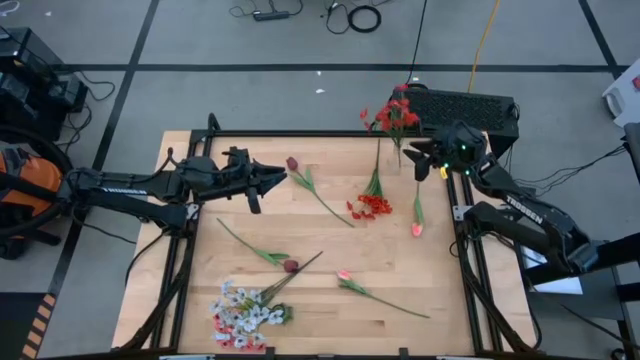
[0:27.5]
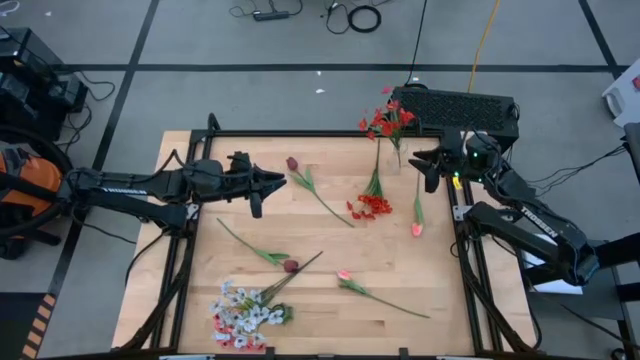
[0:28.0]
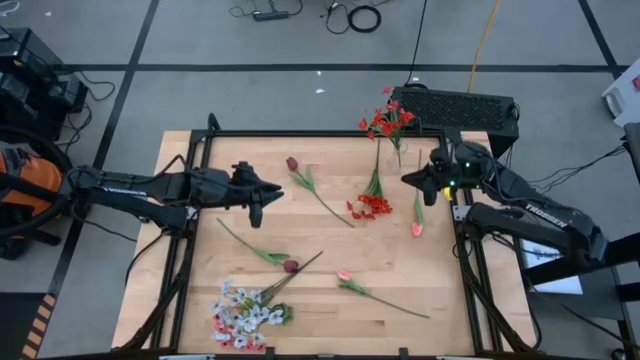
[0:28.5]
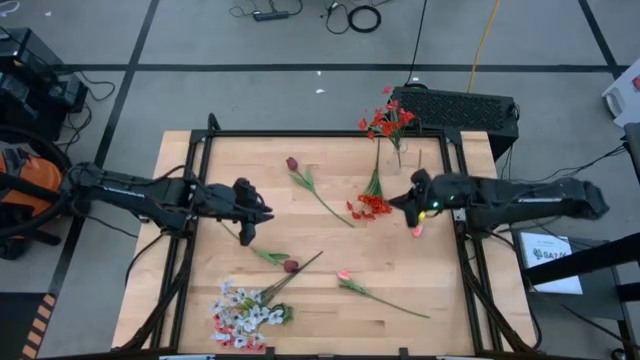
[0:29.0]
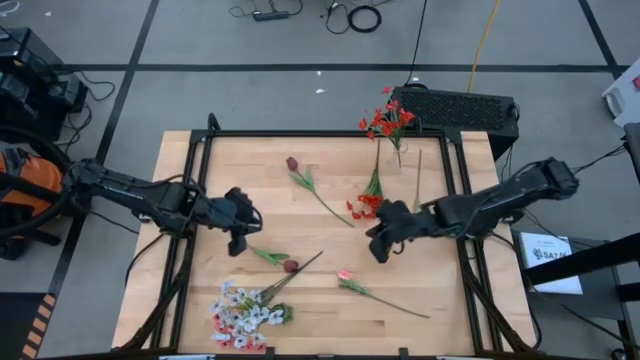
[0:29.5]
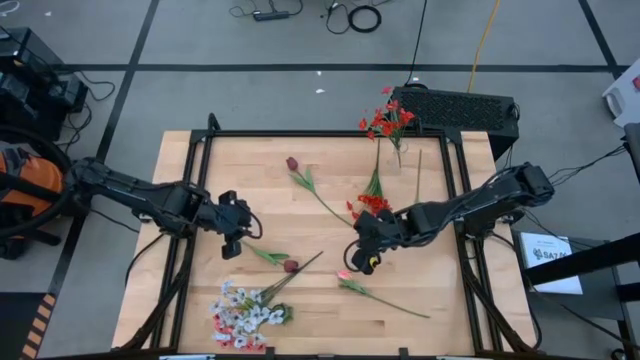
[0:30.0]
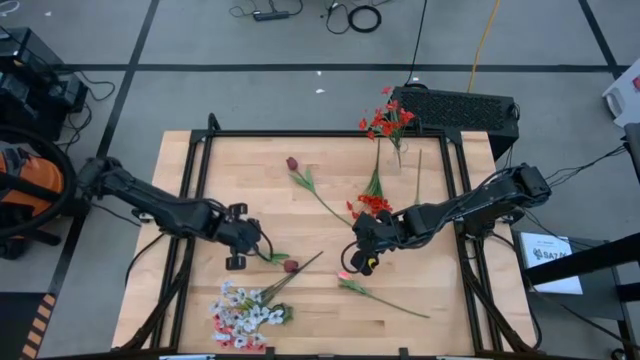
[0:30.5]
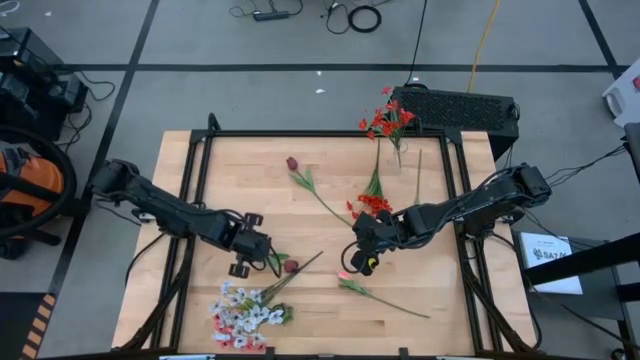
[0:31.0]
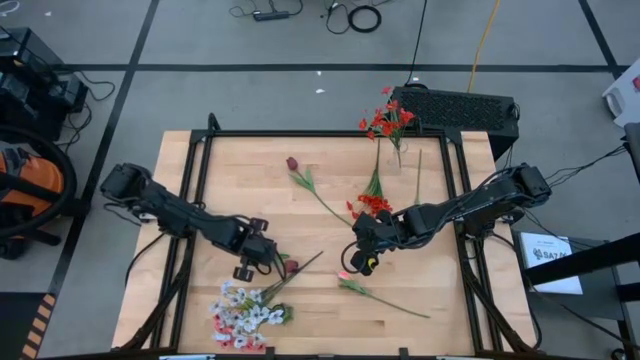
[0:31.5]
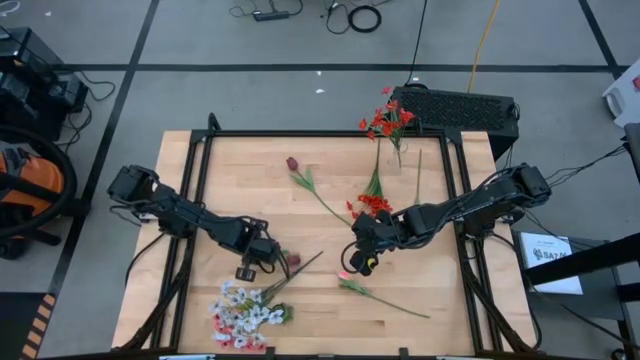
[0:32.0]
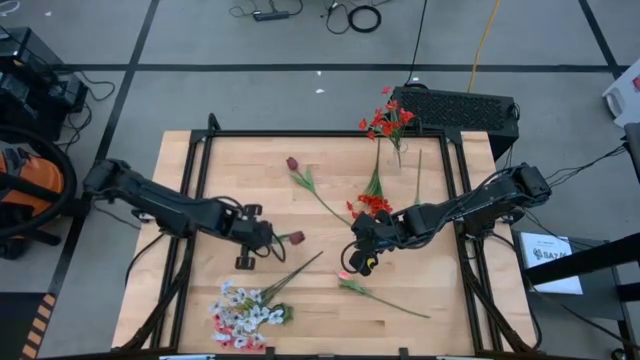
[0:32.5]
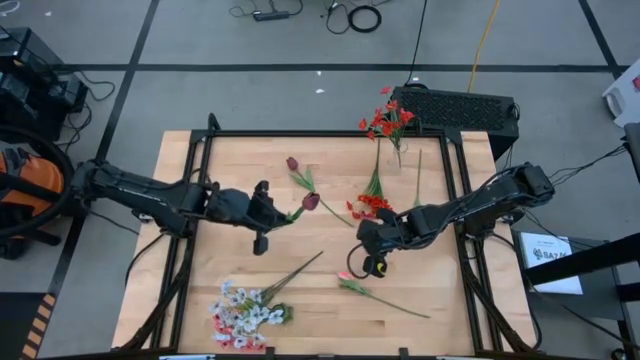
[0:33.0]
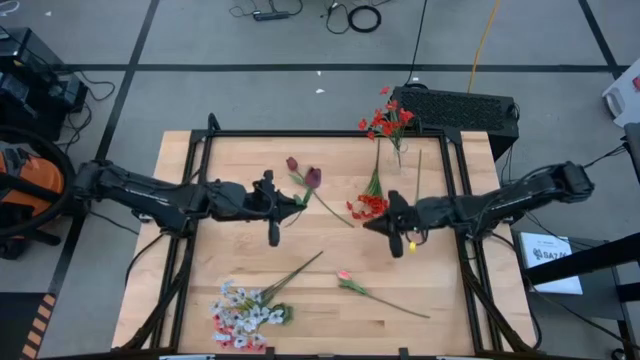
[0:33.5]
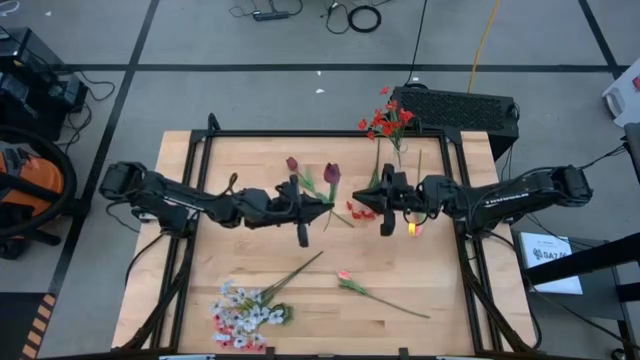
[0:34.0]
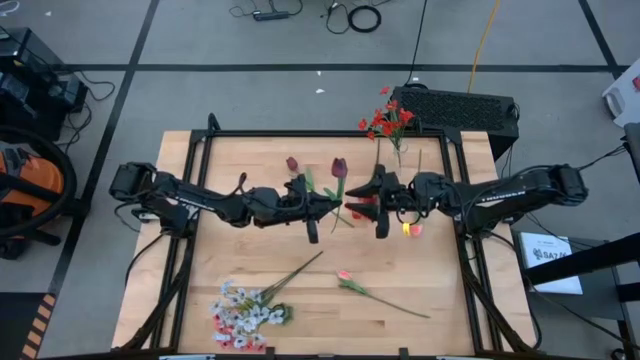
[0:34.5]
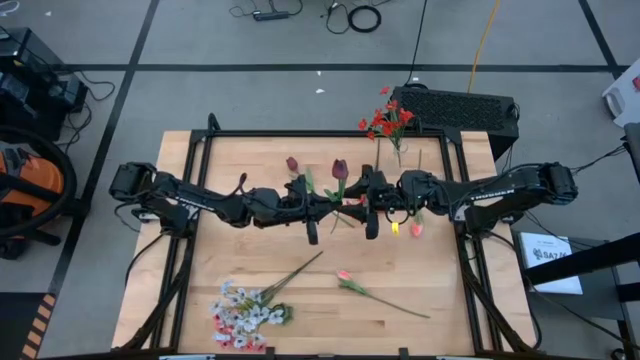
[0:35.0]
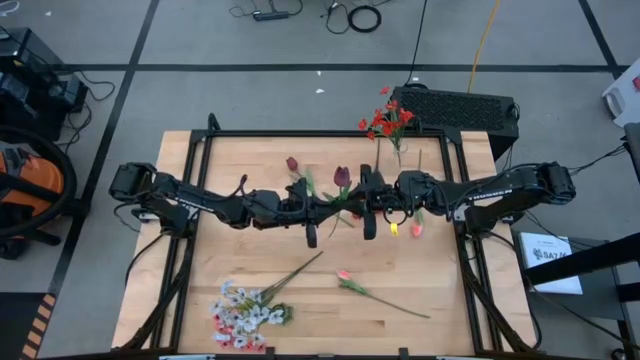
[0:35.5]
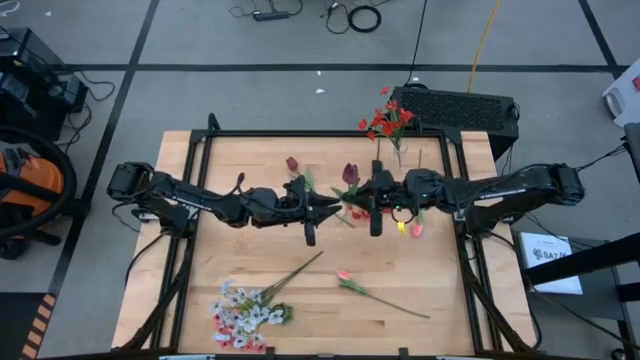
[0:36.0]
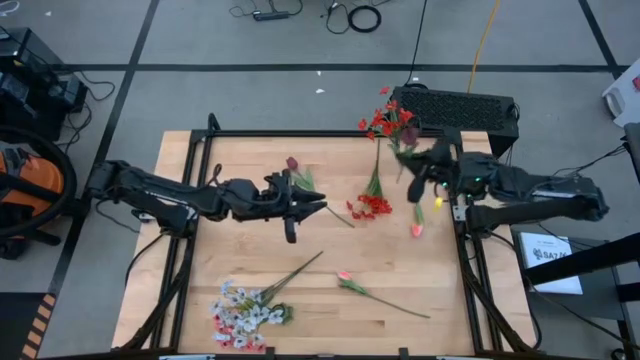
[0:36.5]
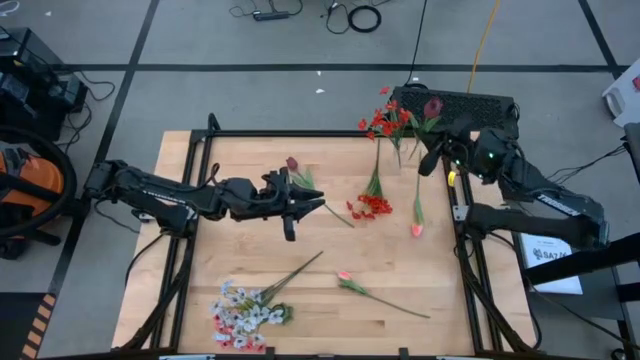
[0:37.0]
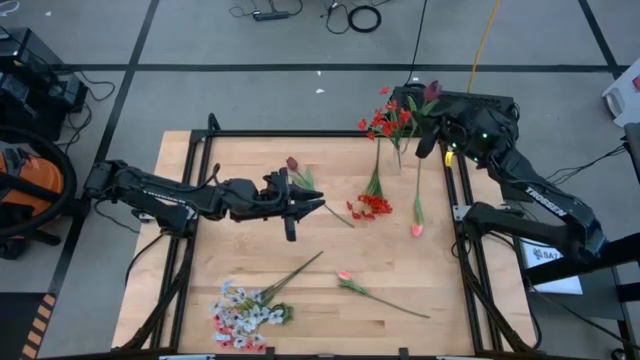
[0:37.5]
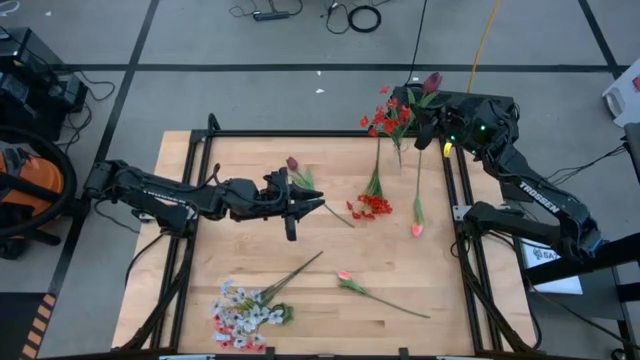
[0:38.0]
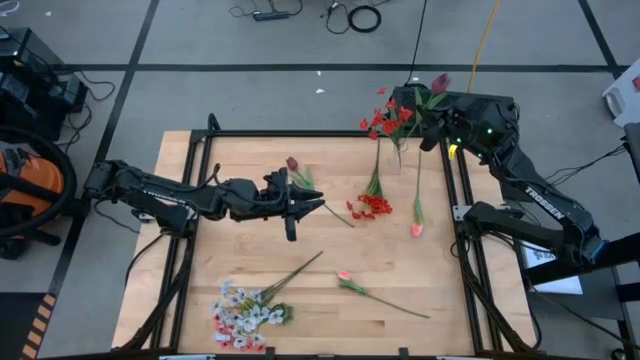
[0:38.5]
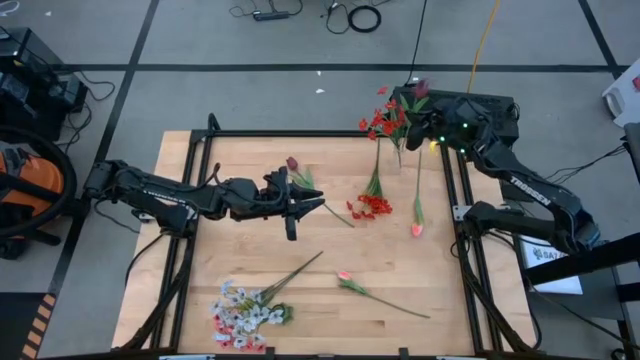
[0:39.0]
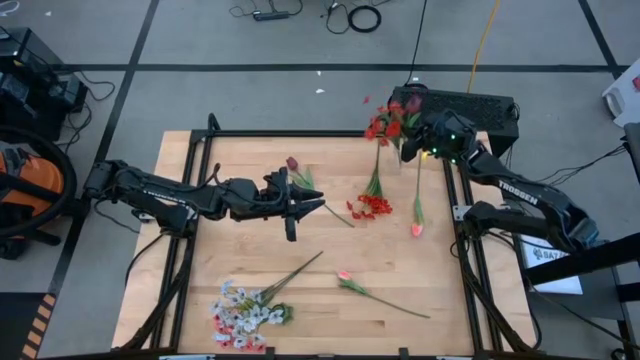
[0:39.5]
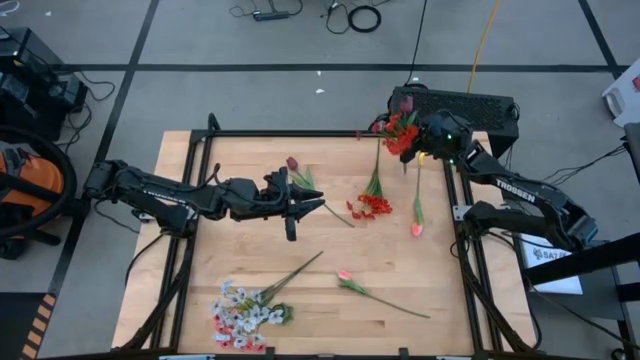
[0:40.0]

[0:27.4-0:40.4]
Task: Sort flowers into vase by color
Put the bottom red flower into the transparent vase

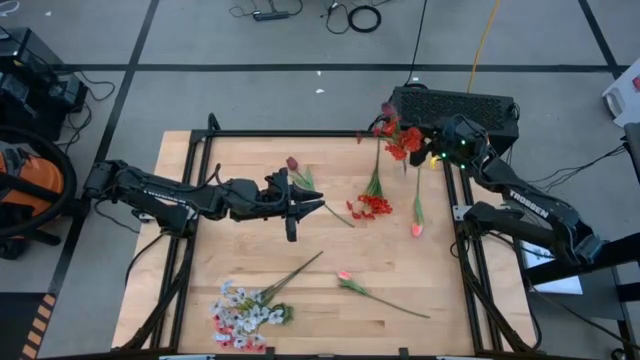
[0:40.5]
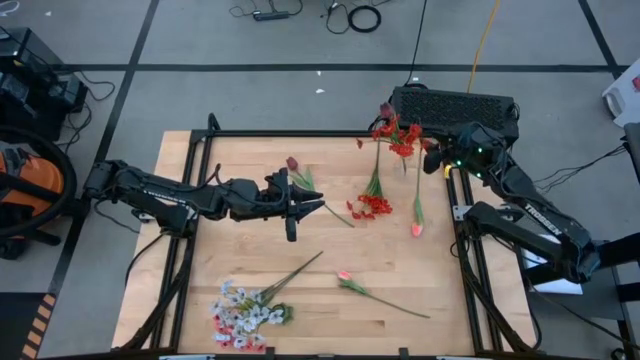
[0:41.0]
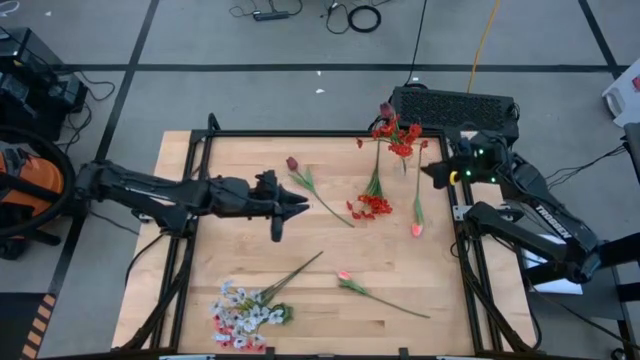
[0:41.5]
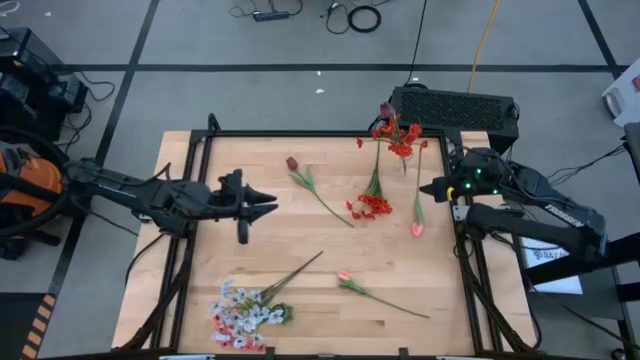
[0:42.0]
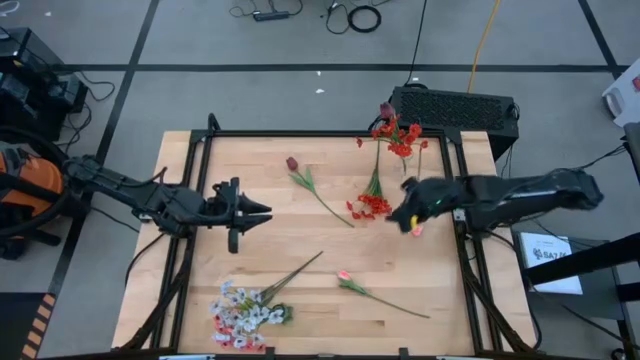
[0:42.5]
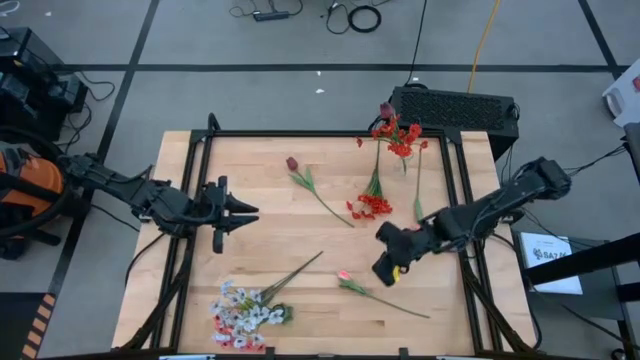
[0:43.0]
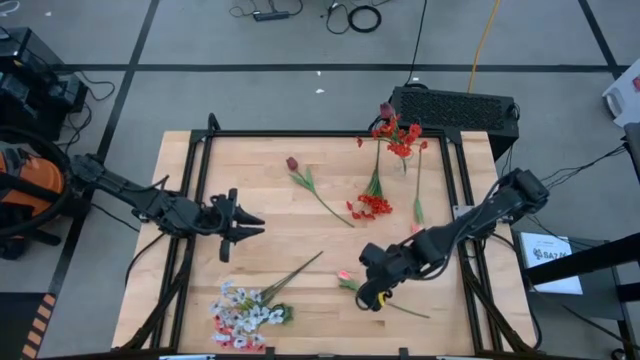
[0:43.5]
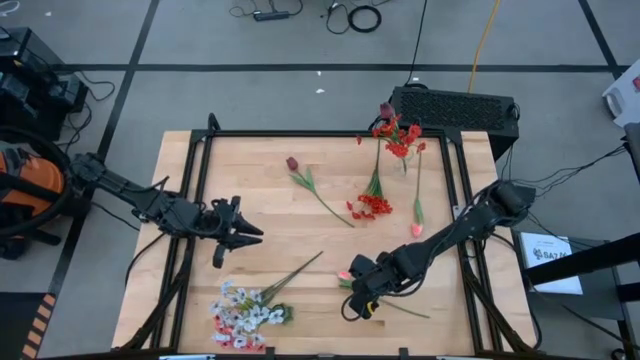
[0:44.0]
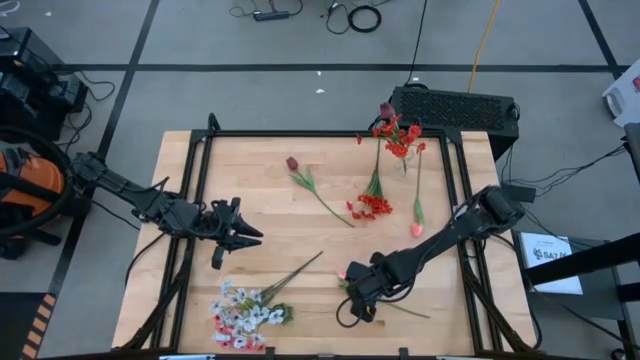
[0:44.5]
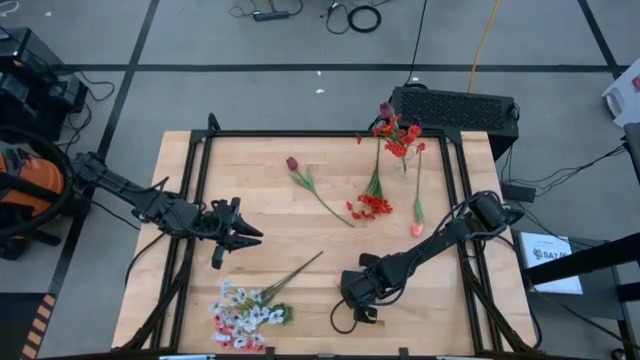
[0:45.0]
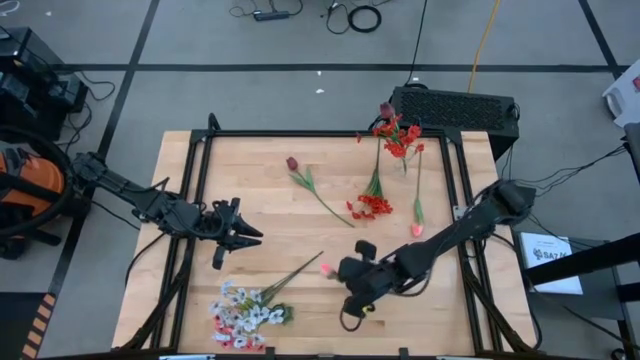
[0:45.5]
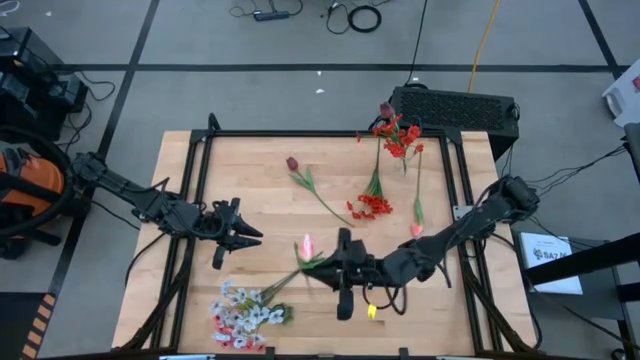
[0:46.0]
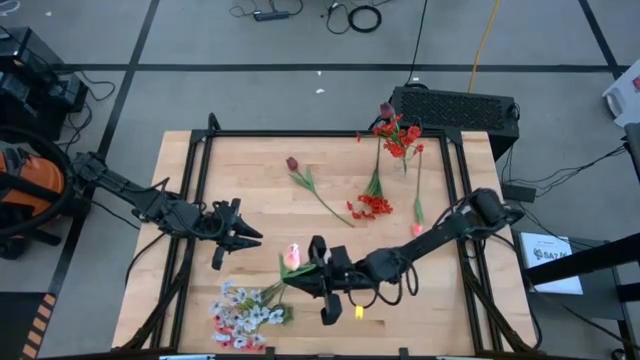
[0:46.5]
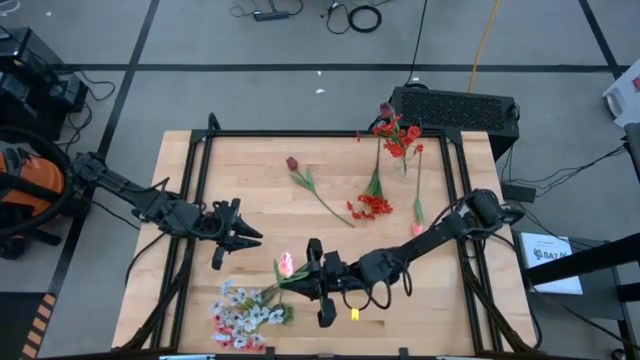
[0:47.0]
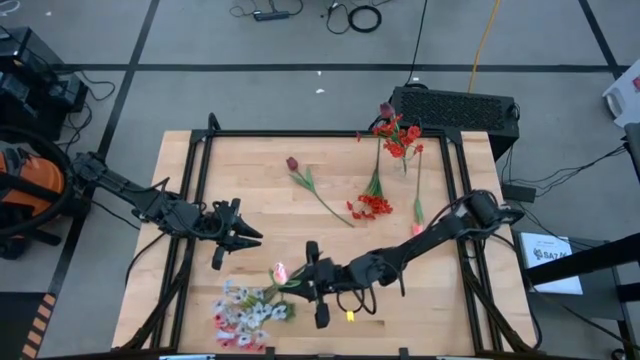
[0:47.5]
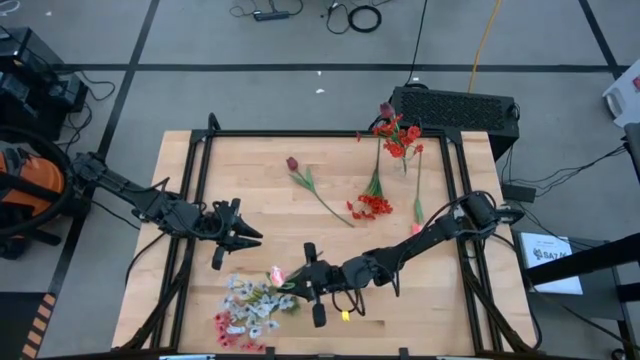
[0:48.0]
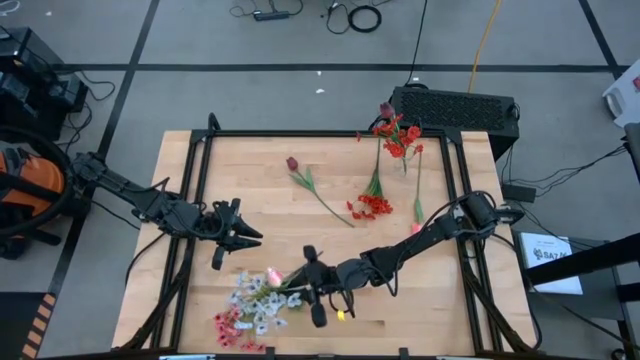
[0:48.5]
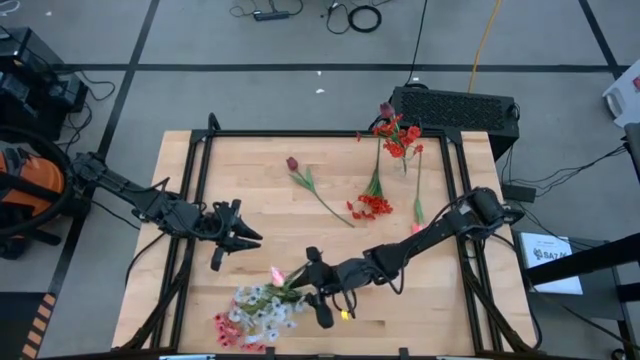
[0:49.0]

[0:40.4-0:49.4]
Put the bottom pink flower into the green vase
